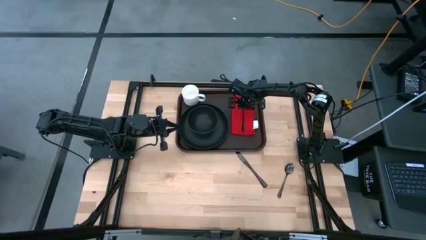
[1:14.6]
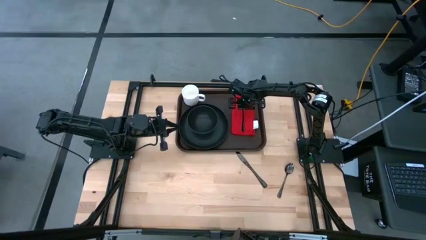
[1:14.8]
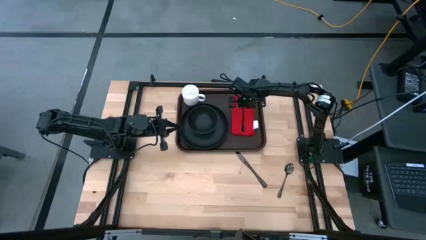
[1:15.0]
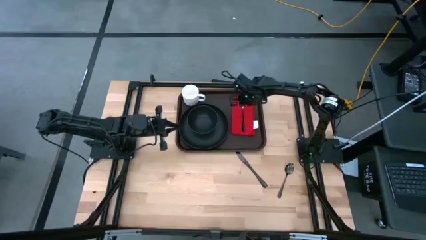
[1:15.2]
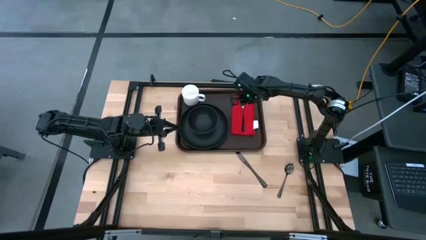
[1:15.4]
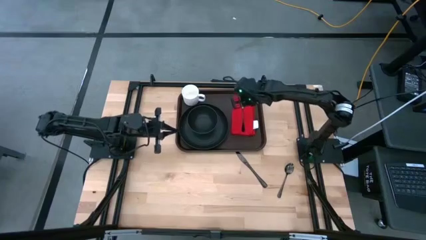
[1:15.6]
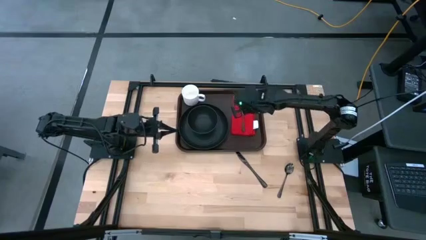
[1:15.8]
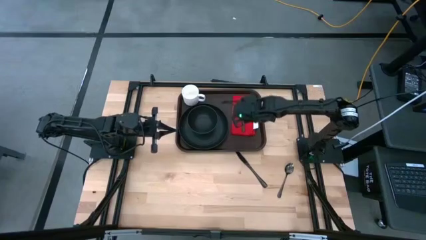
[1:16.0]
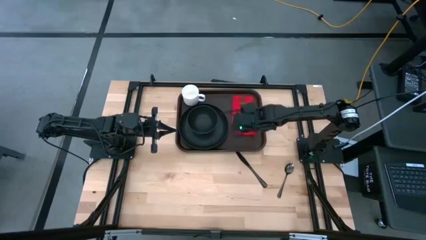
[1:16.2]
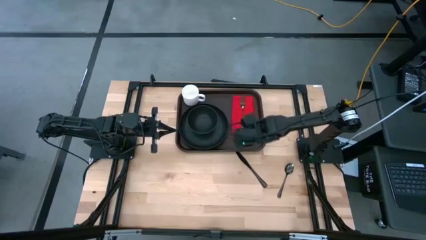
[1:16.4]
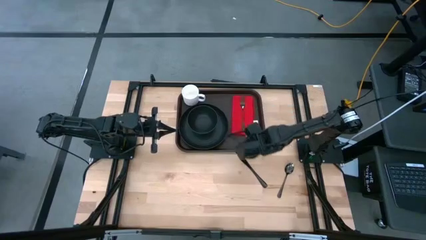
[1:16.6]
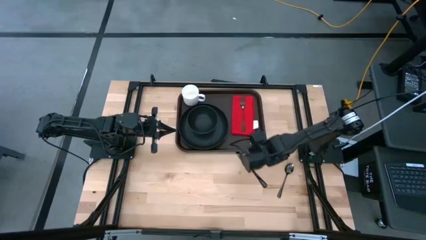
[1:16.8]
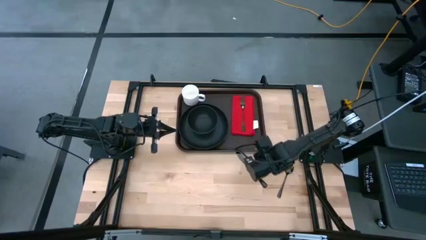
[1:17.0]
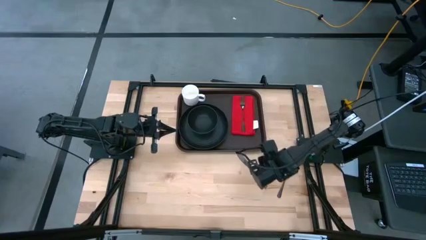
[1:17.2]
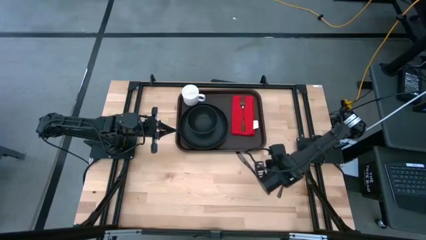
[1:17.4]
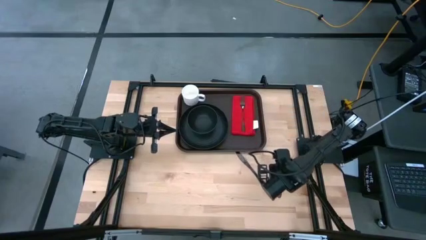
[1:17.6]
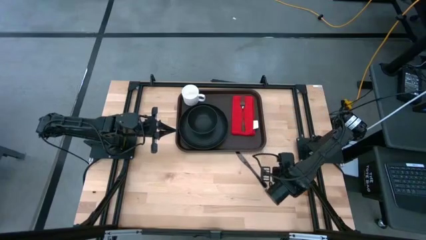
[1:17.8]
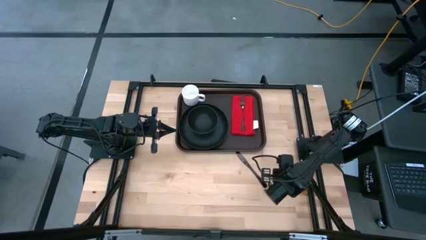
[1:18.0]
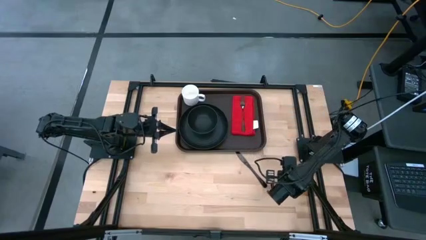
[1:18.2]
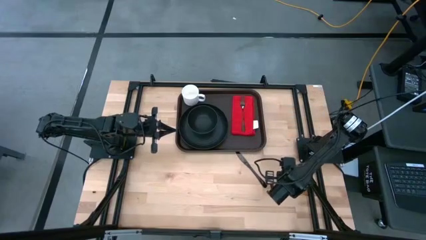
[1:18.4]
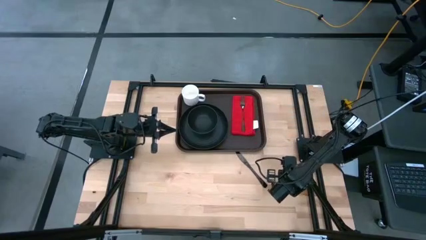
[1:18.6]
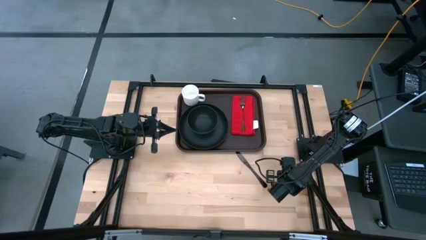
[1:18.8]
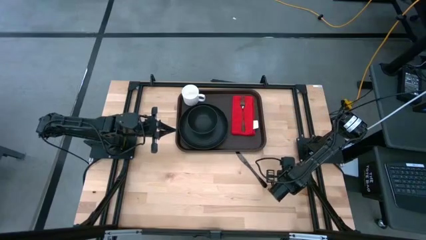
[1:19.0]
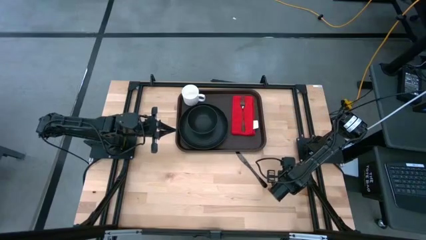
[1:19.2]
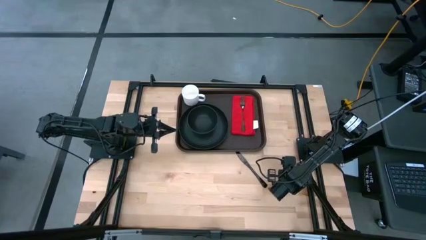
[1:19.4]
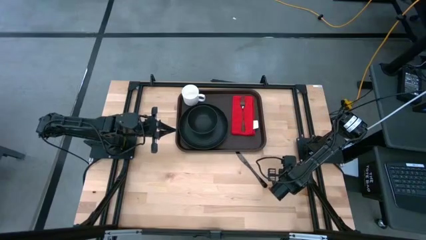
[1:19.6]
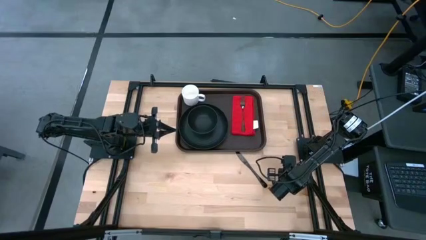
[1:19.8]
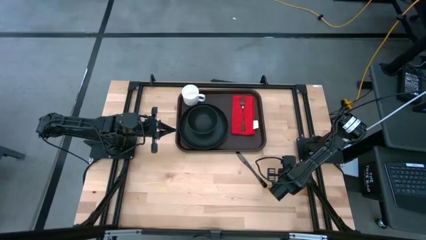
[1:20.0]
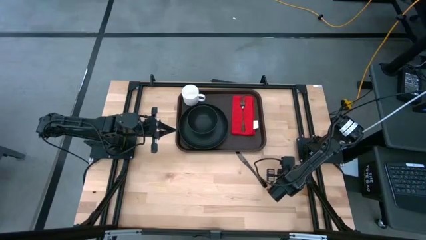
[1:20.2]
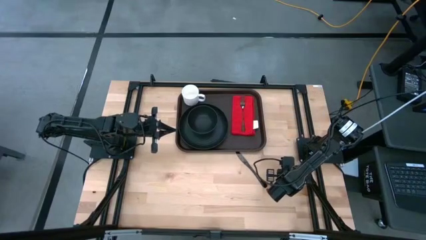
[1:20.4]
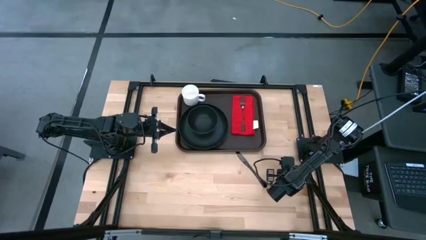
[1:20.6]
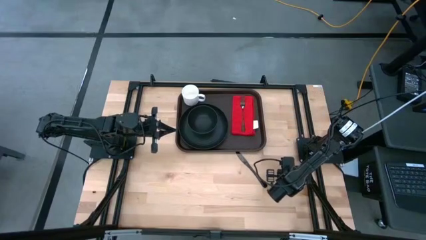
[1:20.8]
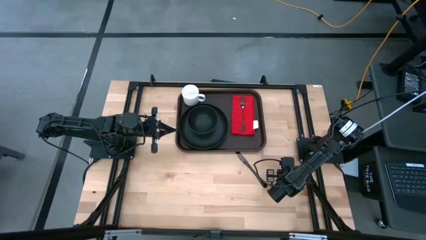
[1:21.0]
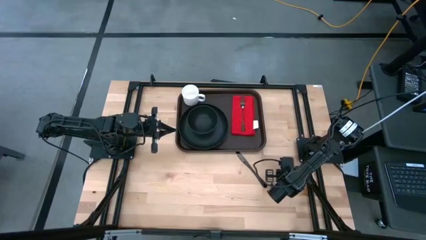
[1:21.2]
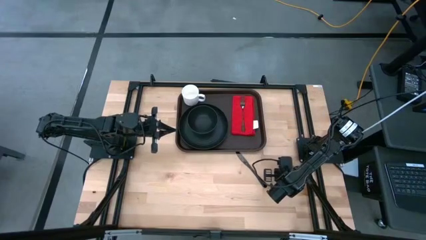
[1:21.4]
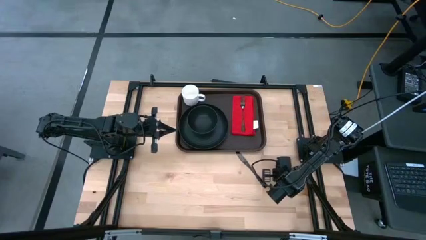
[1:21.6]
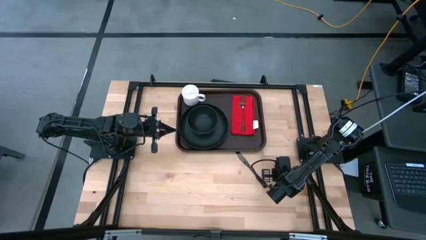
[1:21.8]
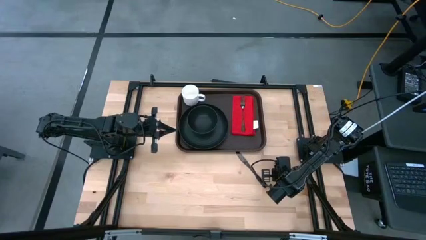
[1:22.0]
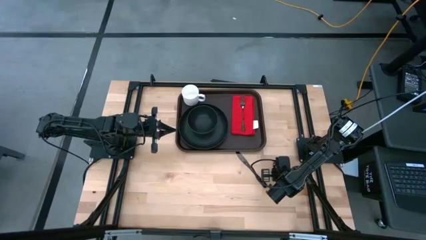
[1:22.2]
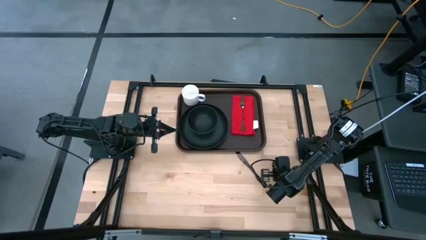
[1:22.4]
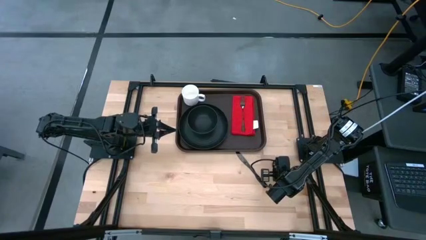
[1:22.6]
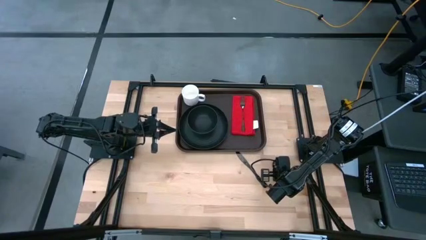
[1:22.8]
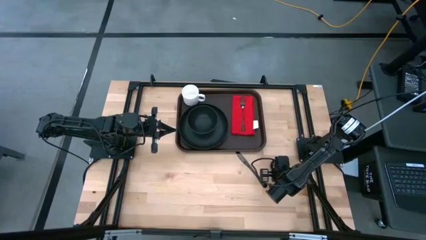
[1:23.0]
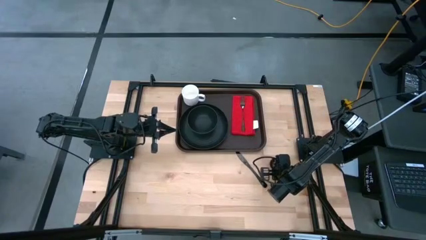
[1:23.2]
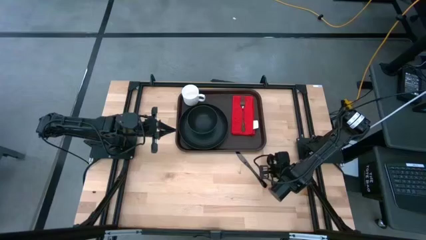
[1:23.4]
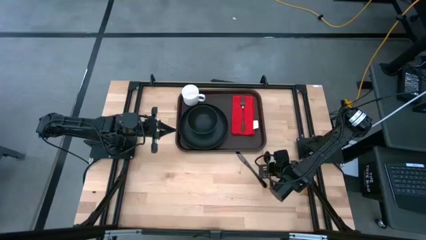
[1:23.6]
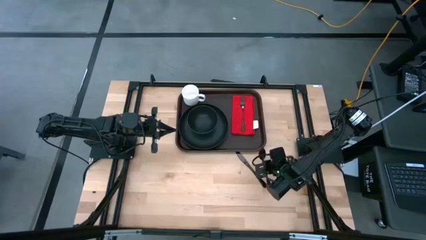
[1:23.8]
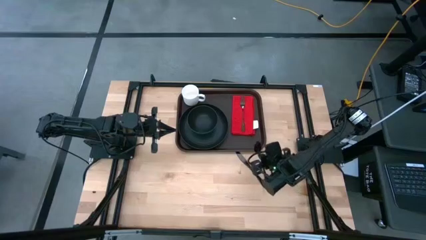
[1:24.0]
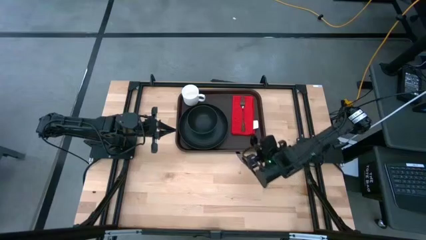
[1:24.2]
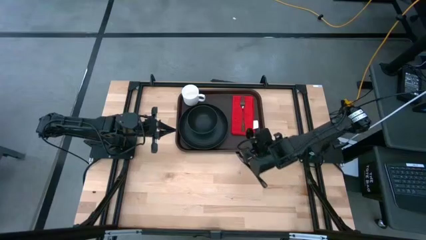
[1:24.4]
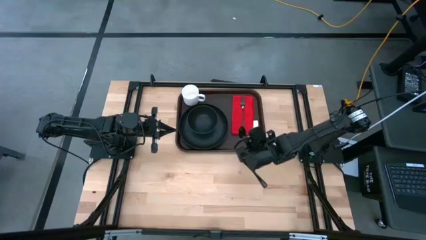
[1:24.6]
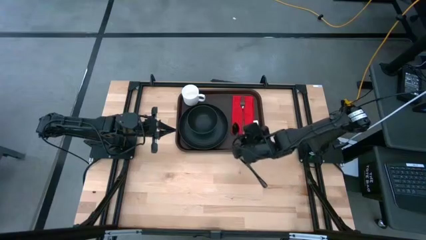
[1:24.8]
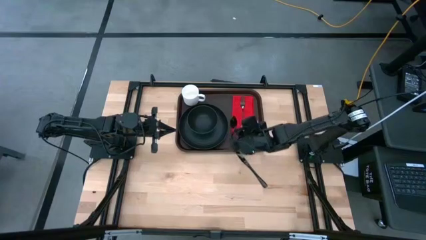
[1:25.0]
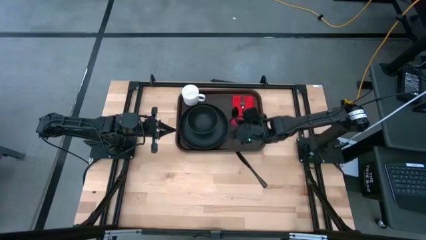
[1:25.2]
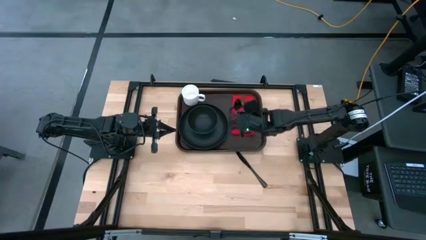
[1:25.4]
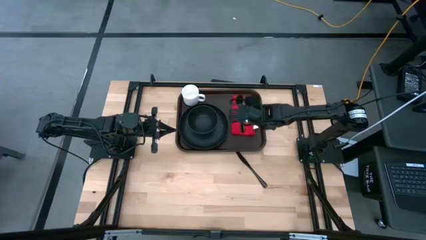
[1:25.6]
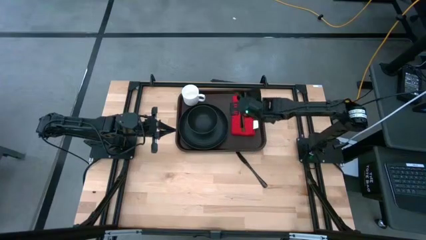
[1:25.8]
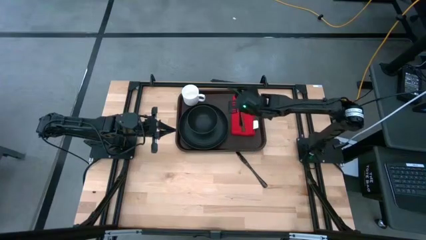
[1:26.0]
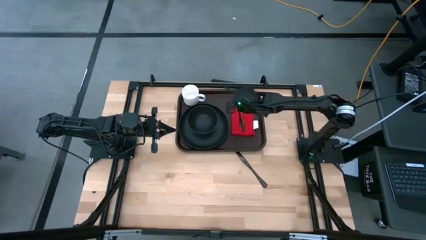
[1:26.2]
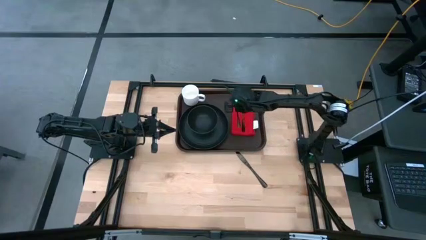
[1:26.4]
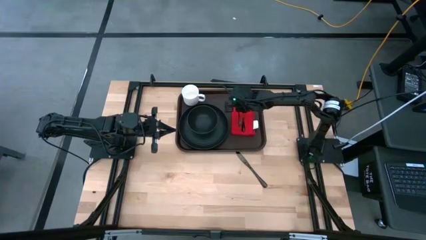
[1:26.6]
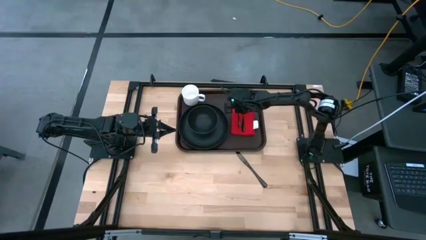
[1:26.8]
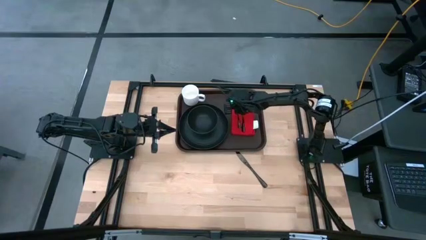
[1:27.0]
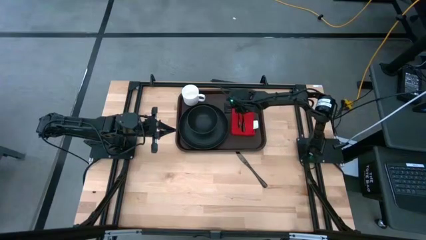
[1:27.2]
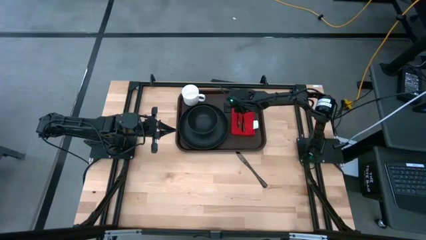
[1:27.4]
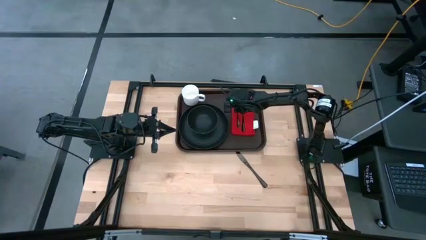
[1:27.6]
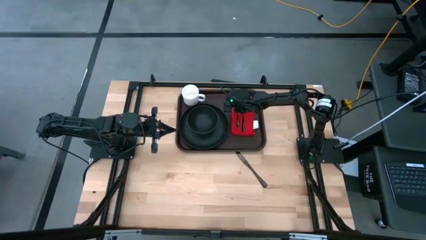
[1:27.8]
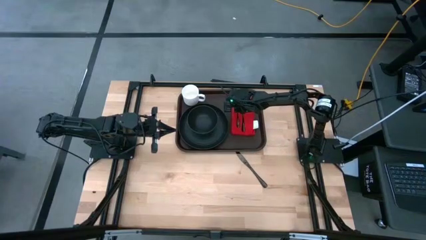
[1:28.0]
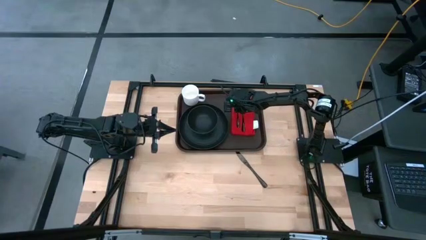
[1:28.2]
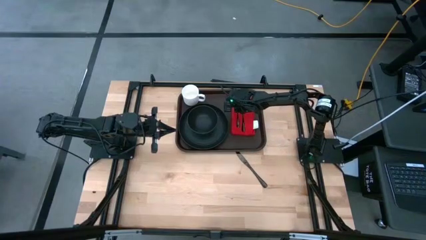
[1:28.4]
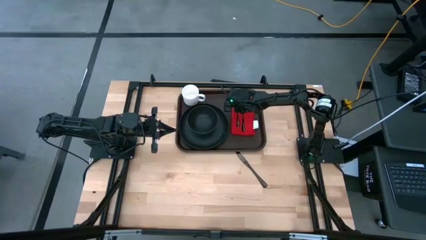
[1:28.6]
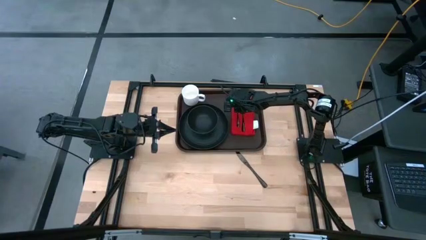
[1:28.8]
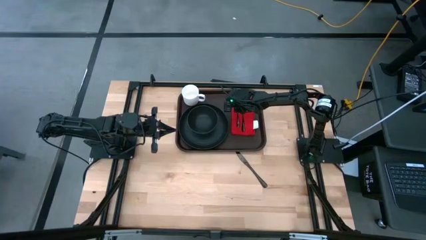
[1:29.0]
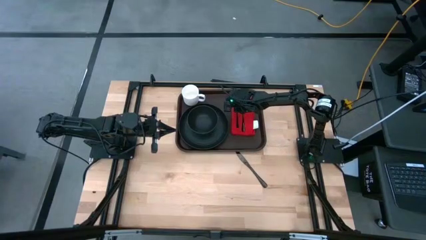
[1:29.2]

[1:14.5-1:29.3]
Task: Set up tray
Put the black spoon on the red napkin to the left of the black fork
